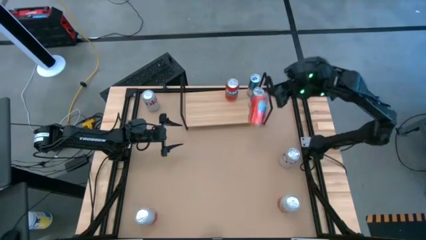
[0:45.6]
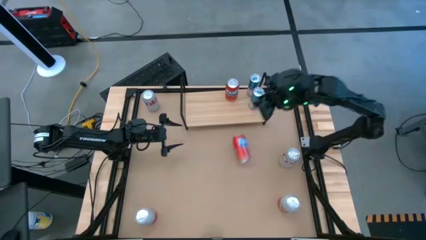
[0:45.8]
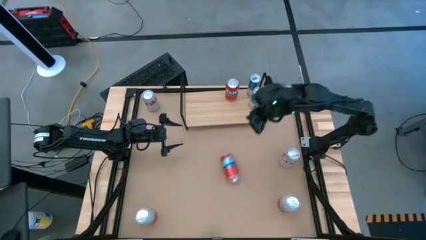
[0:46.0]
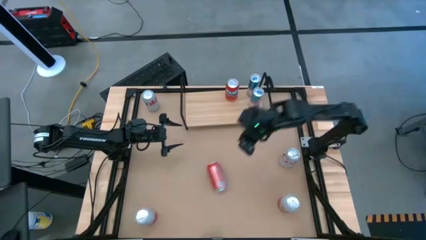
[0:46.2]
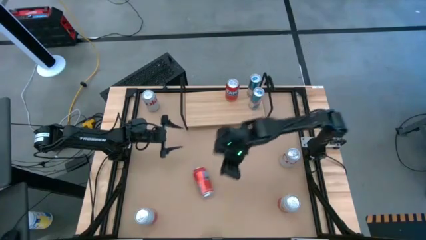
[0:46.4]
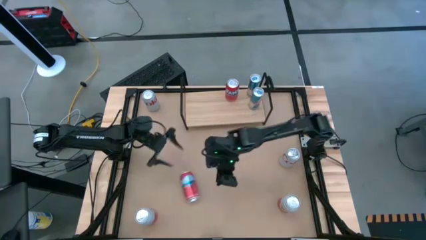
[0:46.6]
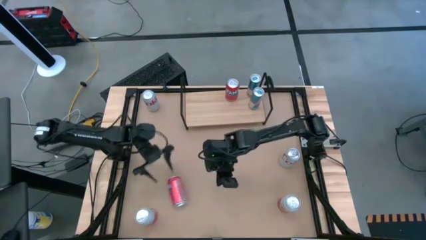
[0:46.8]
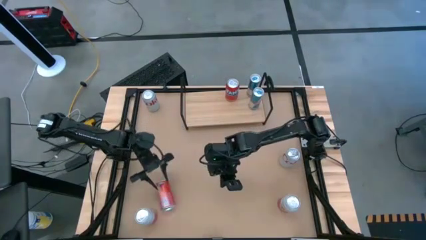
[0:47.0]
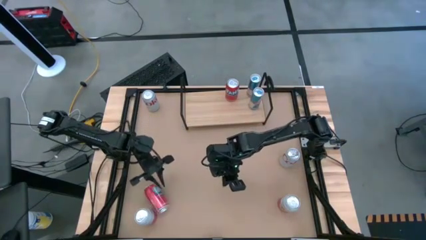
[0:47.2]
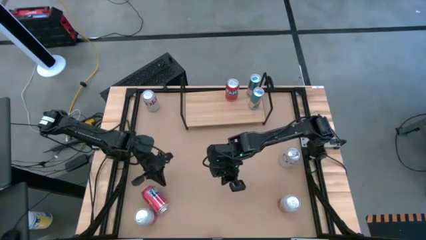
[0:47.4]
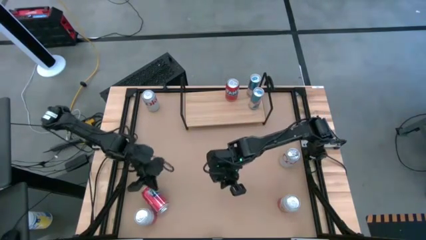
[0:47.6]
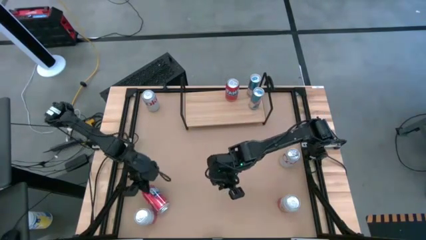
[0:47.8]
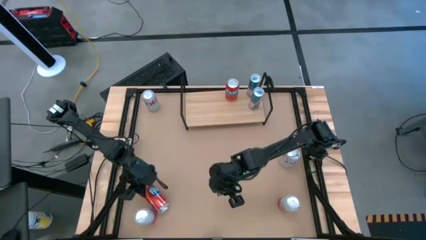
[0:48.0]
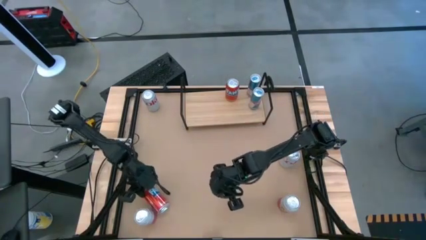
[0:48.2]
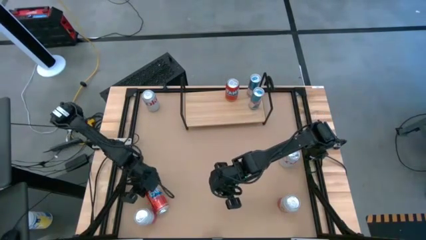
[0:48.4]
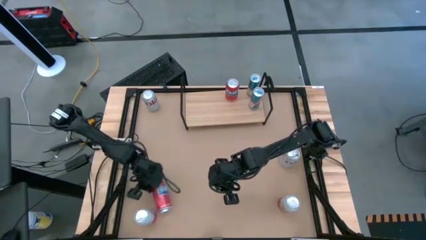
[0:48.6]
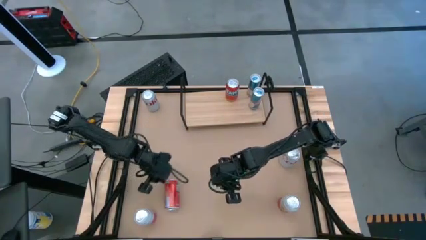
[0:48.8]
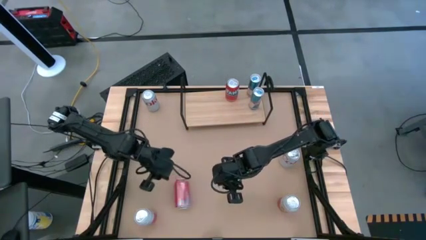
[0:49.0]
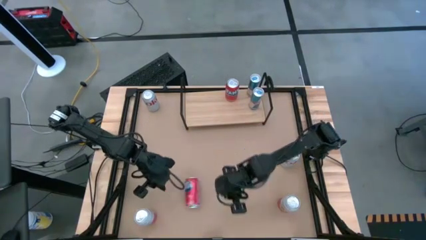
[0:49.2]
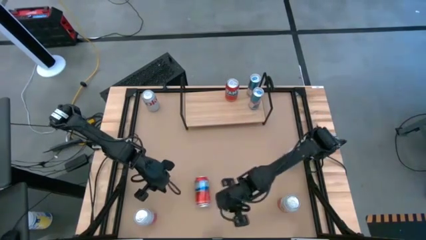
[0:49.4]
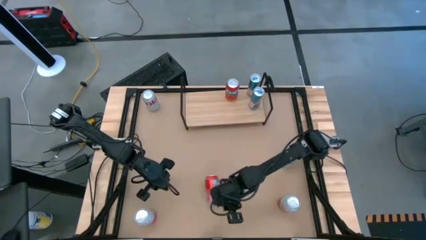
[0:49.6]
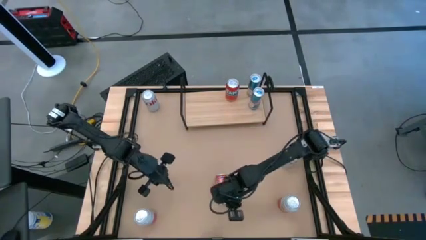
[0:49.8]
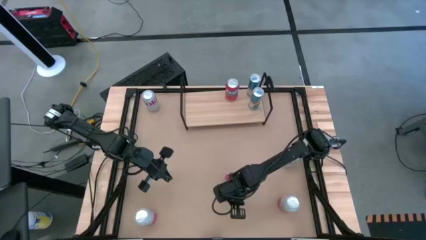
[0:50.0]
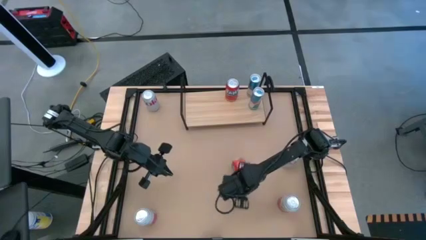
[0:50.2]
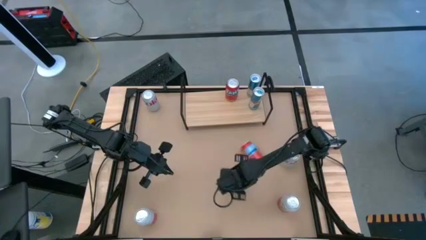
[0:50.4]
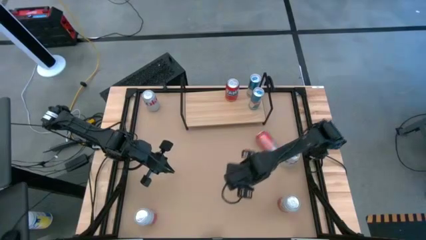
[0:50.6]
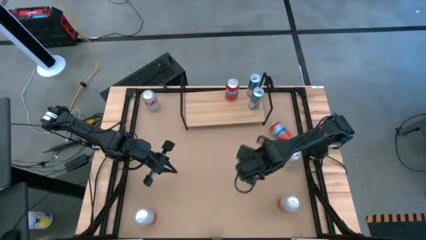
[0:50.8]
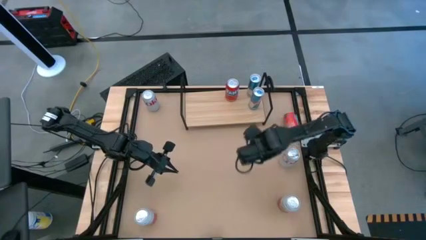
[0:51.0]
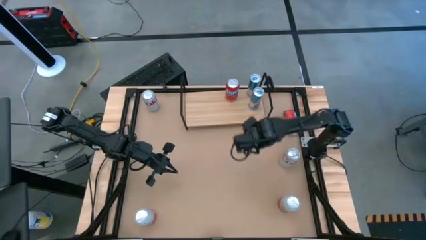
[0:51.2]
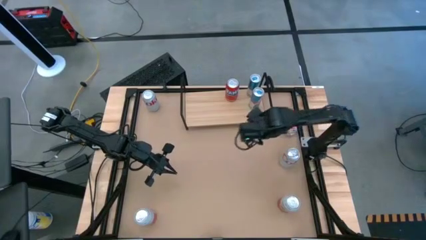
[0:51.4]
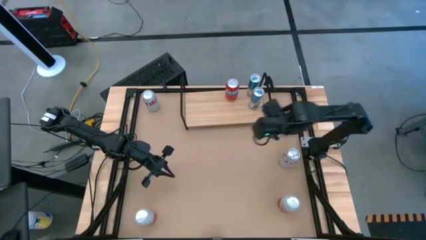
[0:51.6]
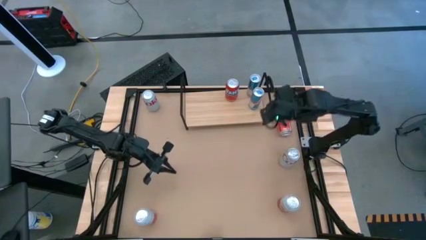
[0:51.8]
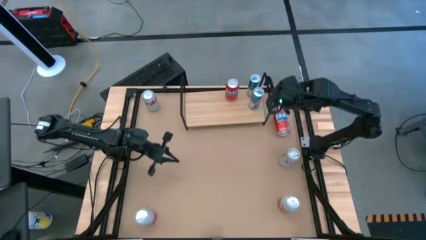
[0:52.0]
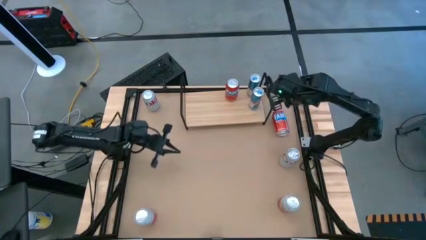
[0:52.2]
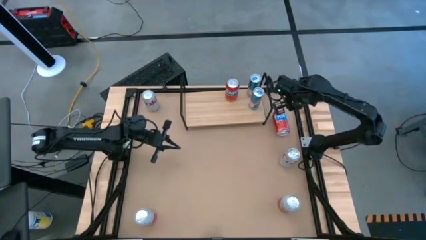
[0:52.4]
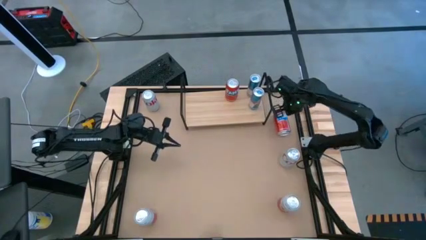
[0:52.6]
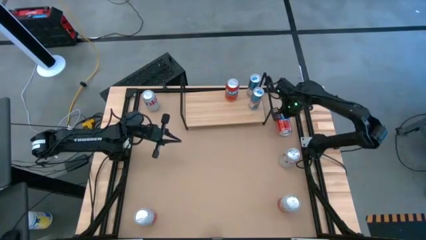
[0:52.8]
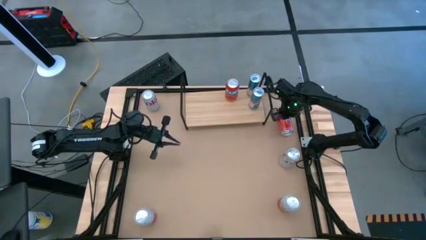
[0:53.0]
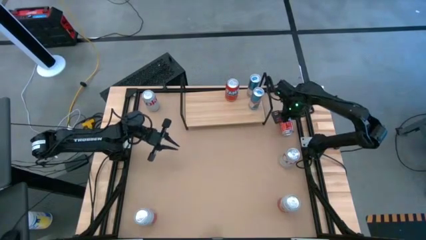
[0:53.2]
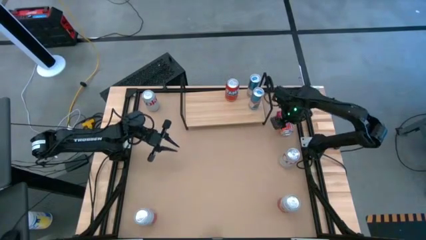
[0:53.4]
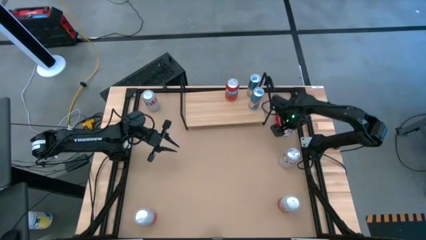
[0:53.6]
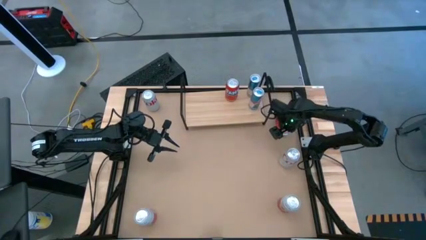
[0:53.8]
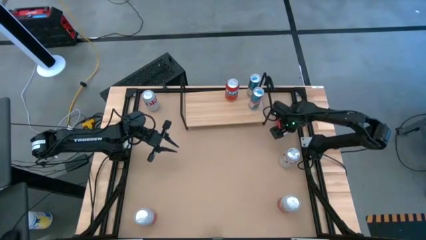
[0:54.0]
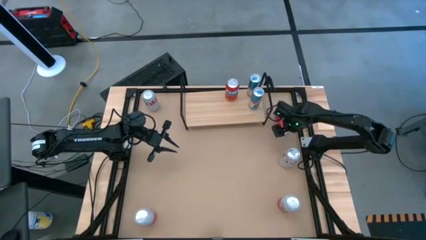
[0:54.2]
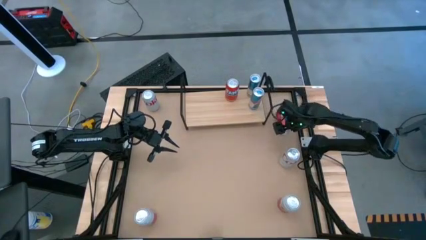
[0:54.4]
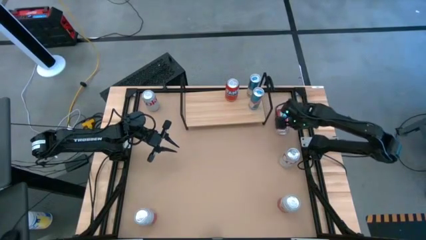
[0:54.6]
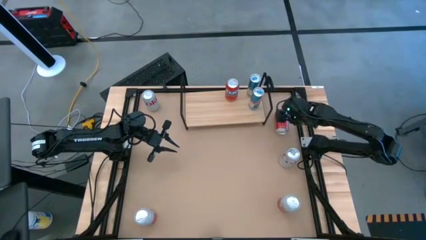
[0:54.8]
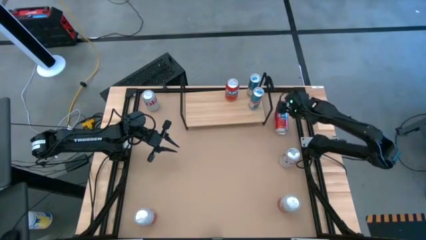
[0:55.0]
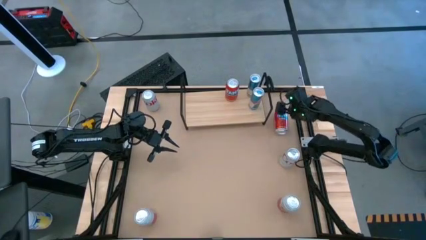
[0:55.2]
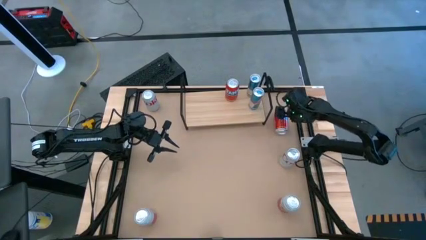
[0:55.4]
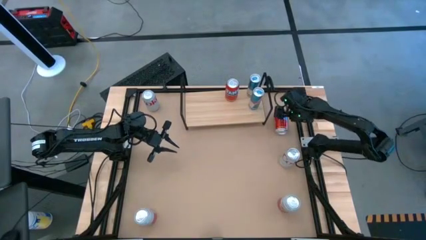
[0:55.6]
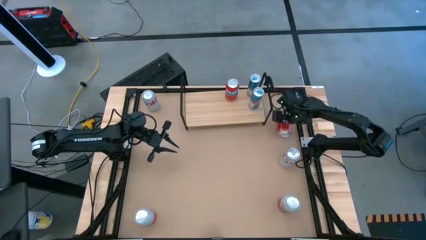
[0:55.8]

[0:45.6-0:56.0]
Task: Place canned beverage on shelf
Put the orange soda can on the shelf aligned with the other orange soda can on the shelf

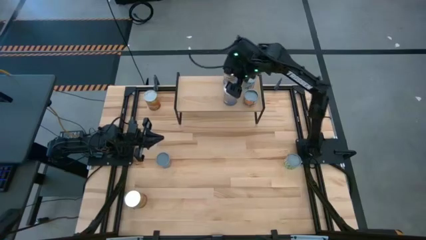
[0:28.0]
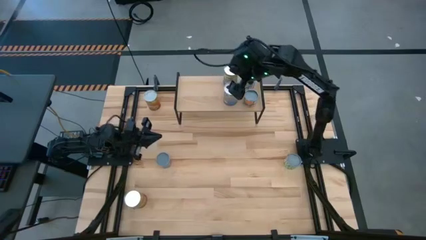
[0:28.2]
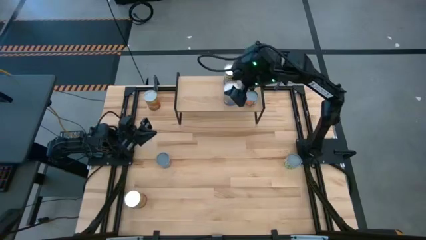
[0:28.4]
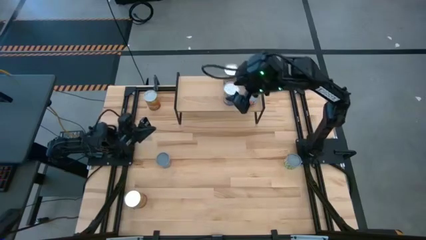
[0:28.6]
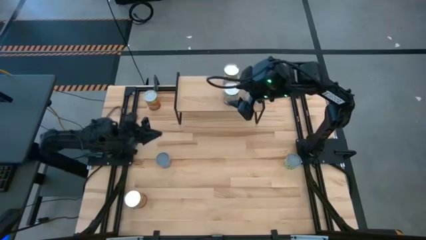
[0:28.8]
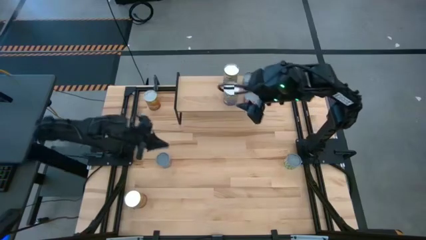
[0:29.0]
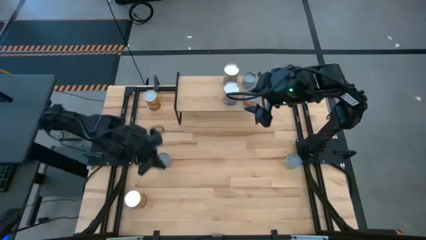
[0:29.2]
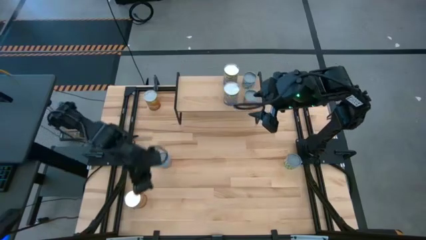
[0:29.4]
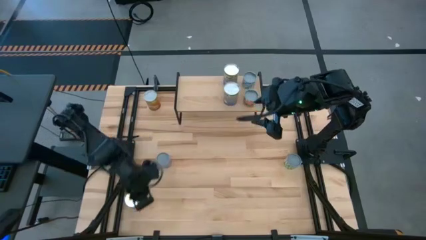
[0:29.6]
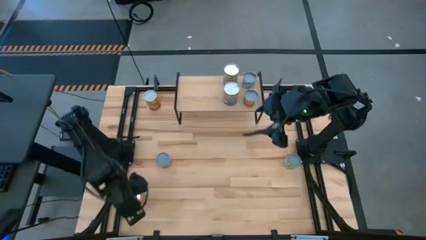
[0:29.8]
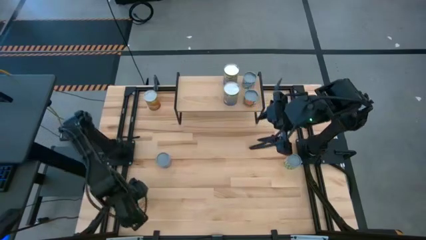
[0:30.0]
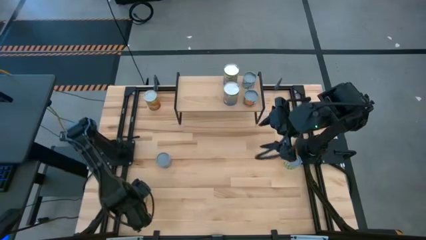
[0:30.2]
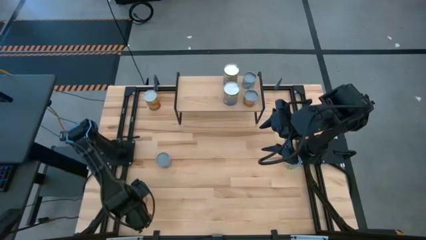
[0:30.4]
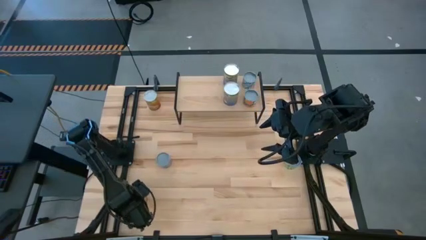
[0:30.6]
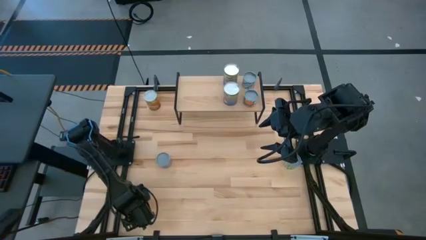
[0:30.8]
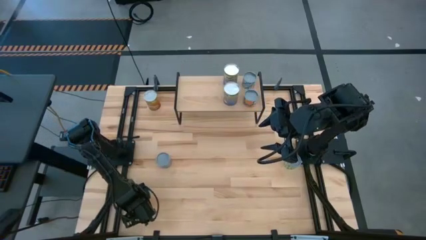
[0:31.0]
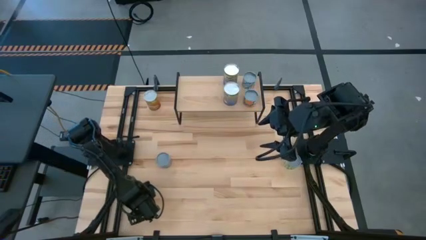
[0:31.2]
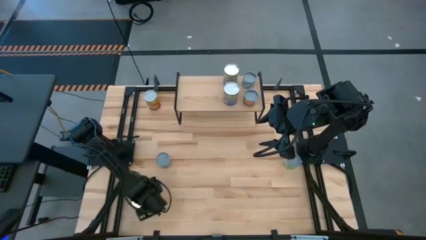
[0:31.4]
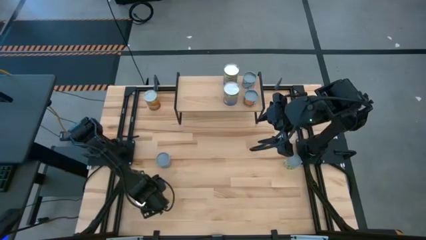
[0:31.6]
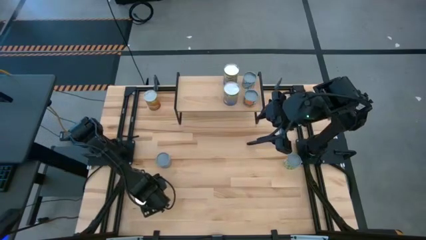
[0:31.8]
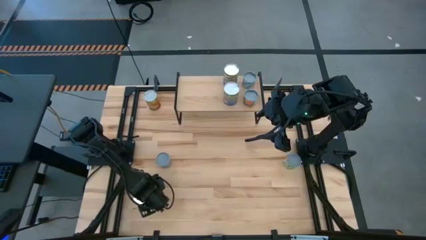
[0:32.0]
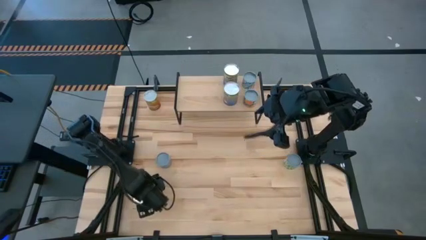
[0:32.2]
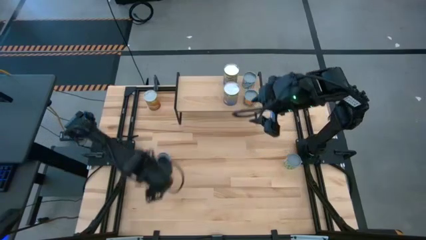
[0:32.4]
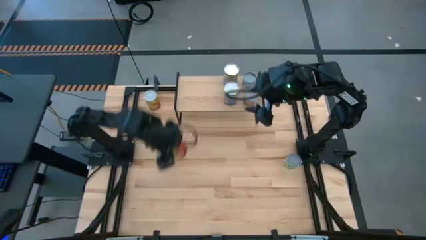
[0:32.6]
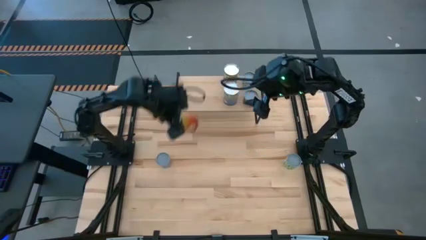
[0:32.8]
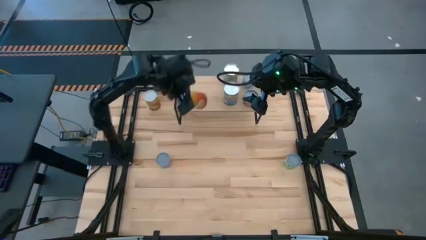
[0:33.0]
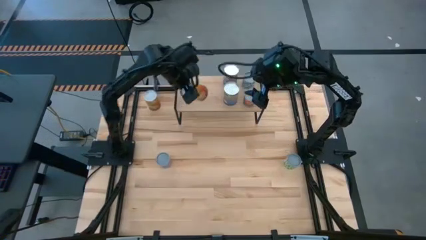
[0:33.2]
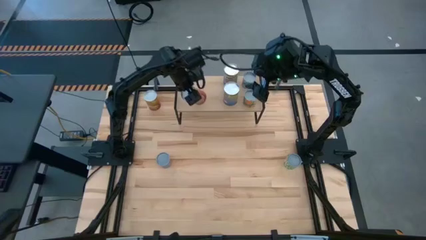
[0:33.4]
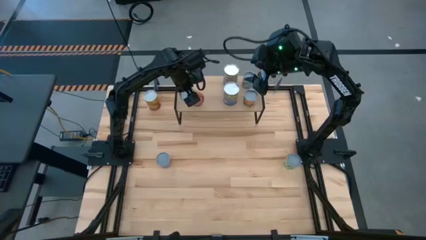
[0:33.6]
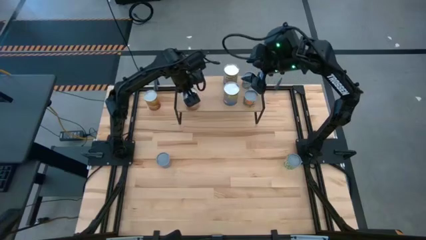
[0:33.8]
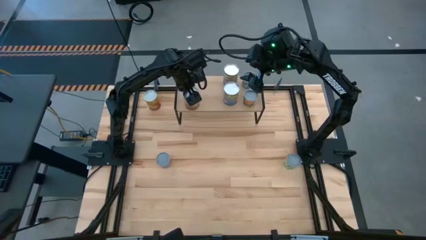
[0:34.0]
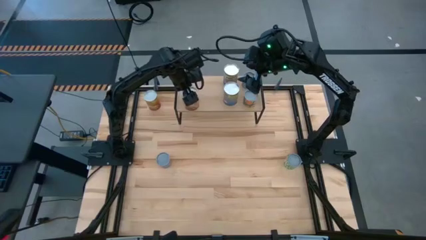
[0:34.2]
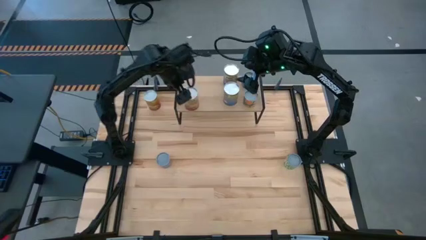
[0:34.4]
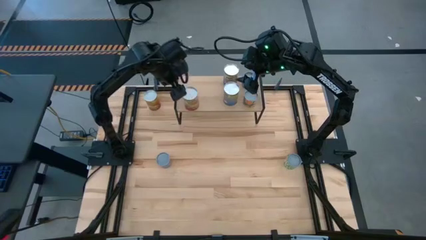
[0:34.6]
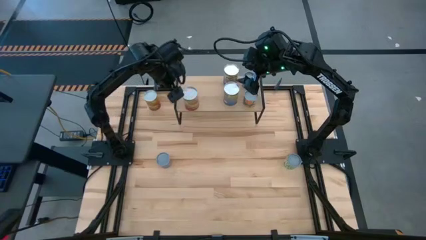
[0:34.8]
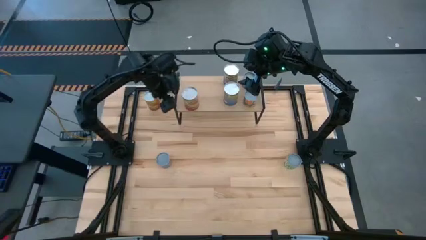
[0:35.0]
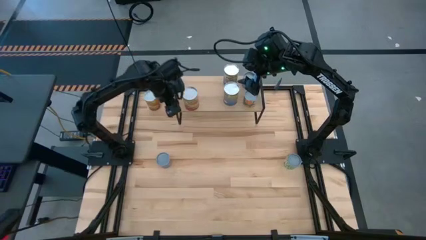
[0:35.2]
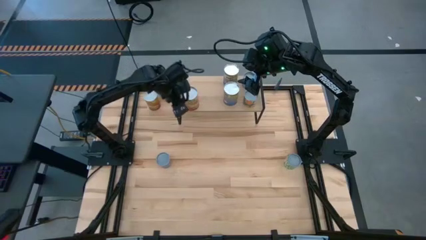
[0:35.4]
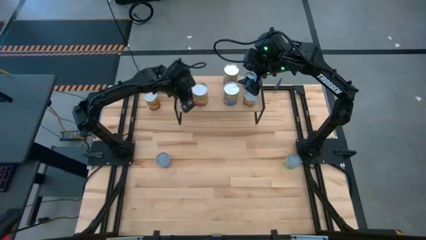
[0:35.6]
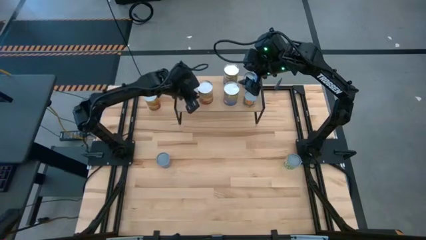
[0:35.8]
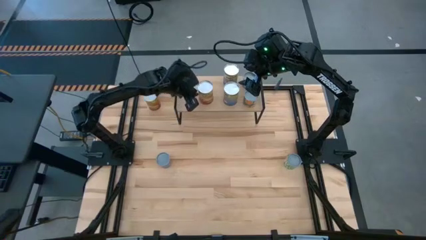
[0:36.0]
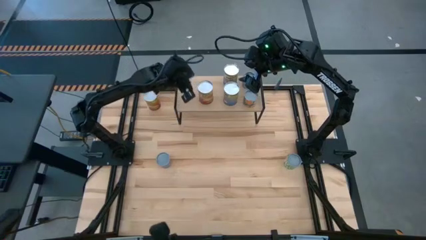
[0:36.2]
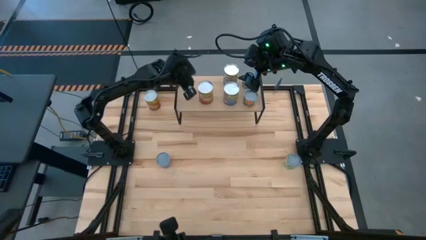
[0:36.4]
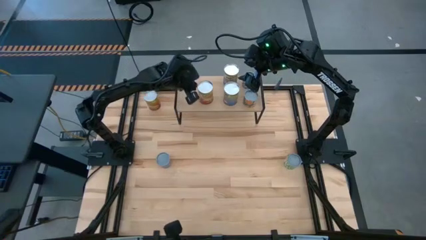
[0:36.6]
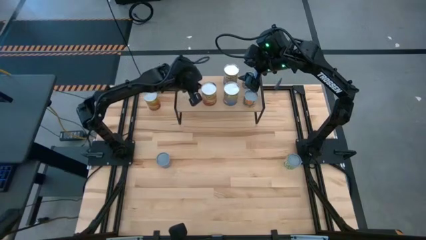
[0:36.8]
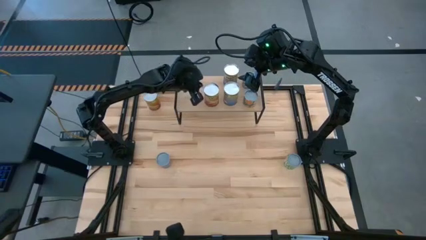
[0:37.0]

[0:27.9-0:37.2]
Task: Pick and place cans onto a shelf
Put the bottom canned corn on the shelf
